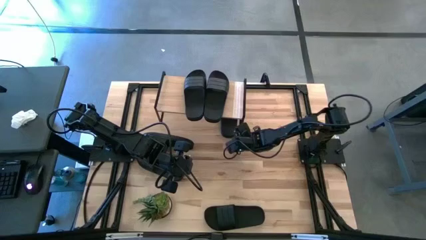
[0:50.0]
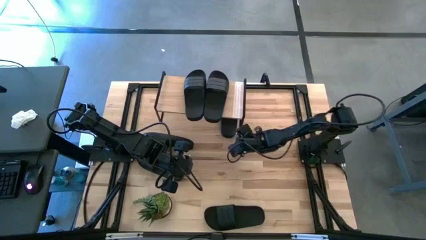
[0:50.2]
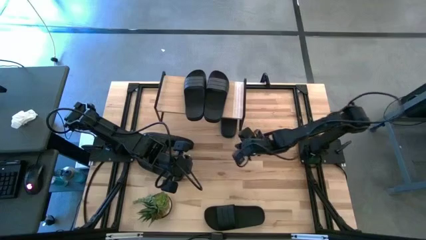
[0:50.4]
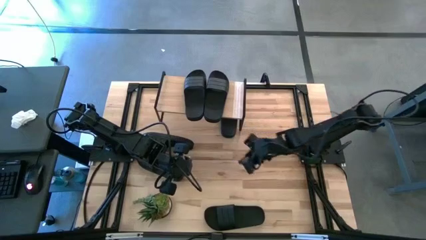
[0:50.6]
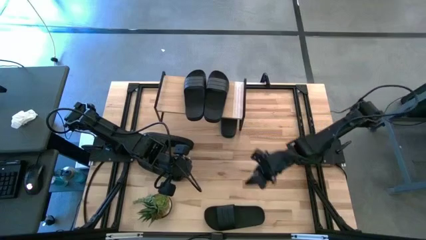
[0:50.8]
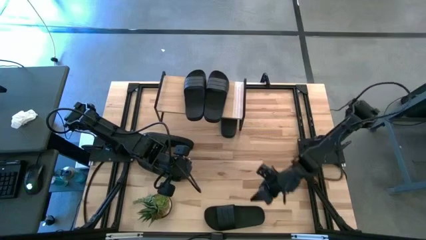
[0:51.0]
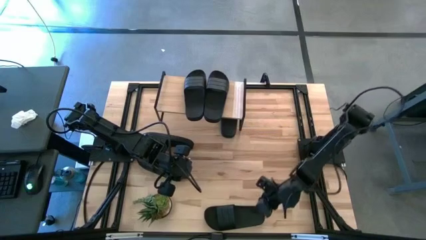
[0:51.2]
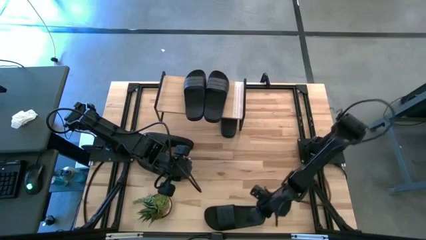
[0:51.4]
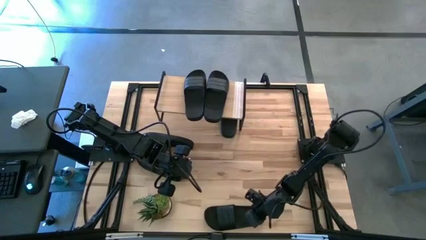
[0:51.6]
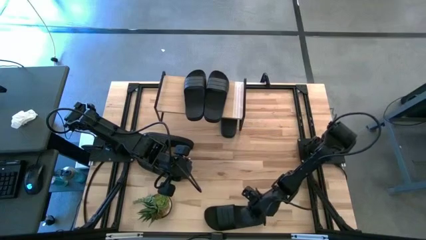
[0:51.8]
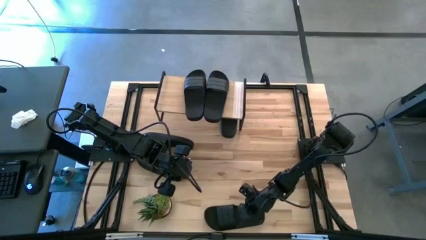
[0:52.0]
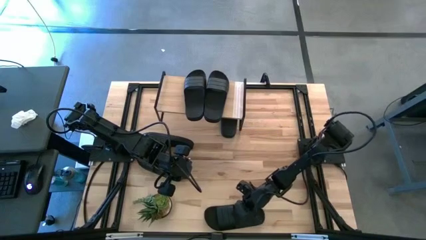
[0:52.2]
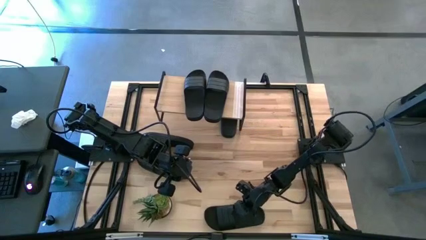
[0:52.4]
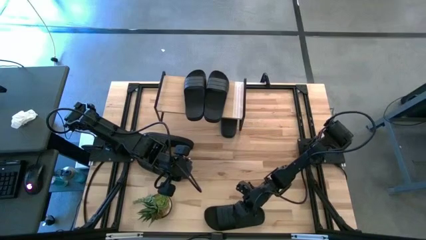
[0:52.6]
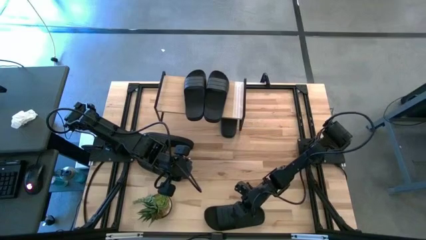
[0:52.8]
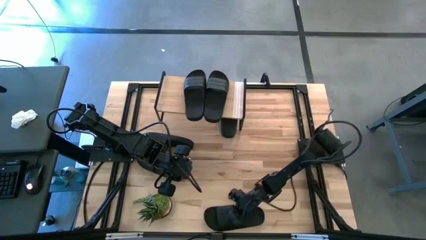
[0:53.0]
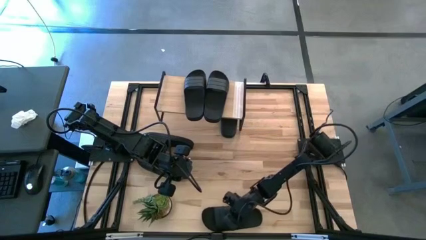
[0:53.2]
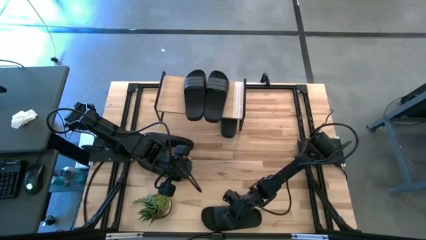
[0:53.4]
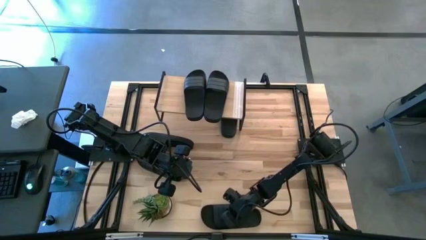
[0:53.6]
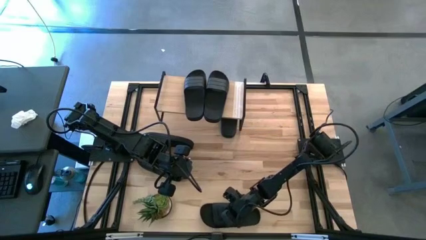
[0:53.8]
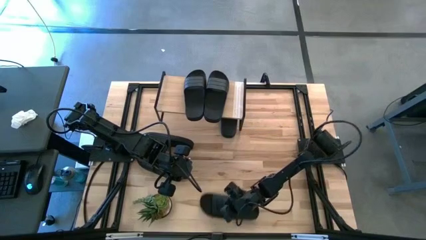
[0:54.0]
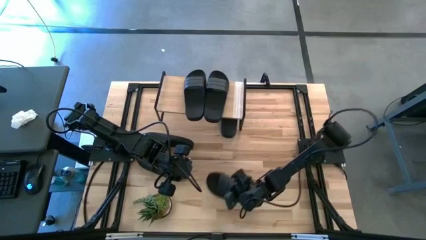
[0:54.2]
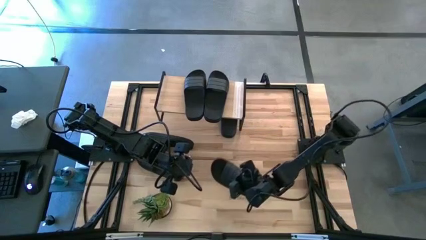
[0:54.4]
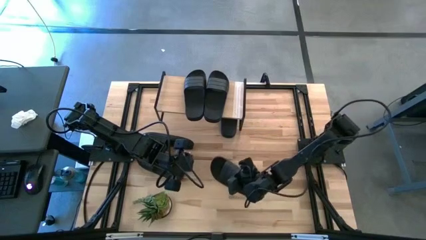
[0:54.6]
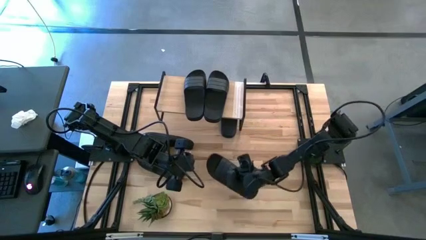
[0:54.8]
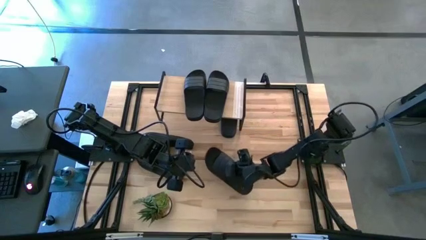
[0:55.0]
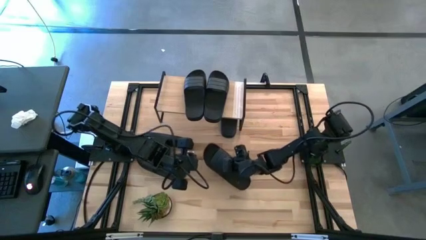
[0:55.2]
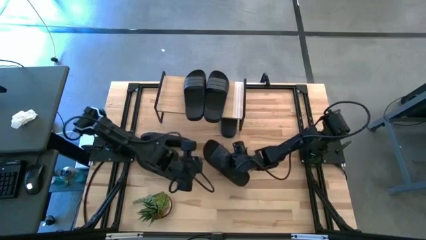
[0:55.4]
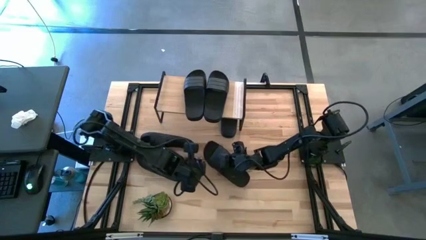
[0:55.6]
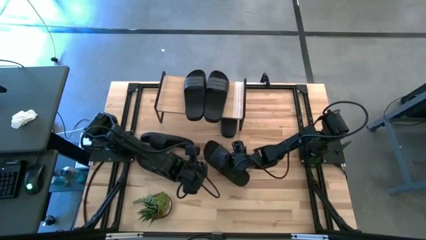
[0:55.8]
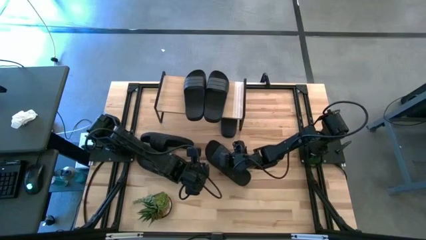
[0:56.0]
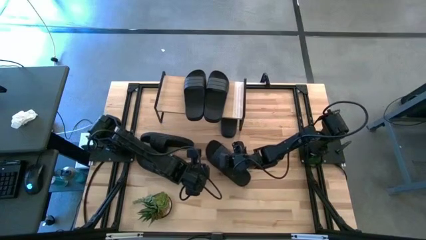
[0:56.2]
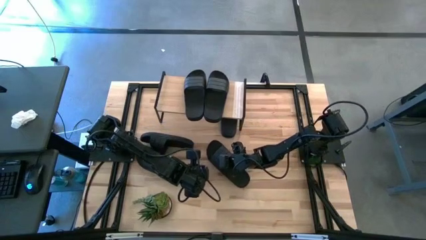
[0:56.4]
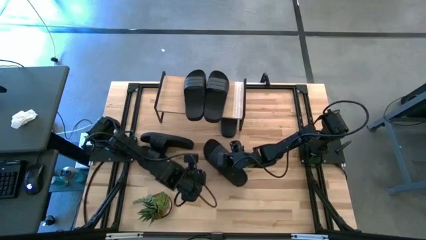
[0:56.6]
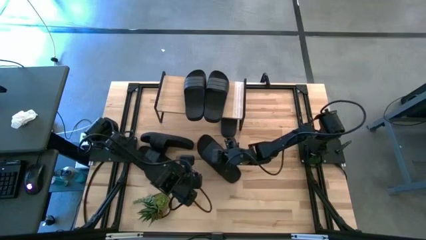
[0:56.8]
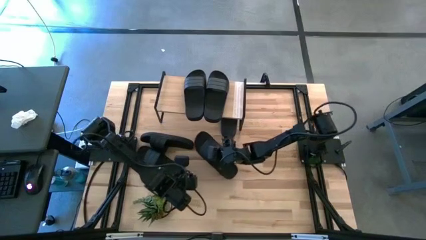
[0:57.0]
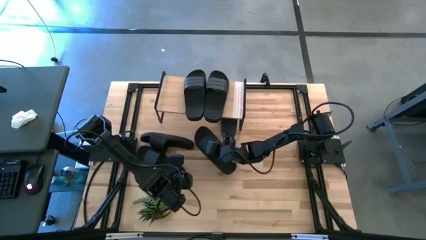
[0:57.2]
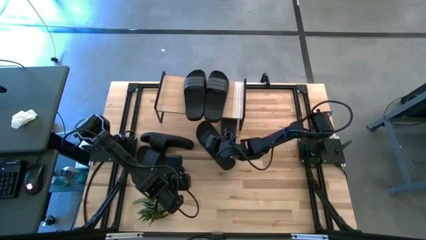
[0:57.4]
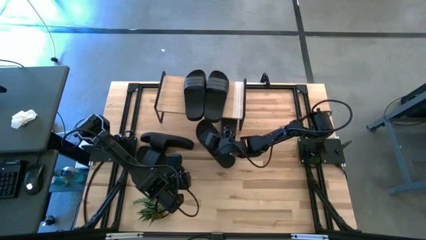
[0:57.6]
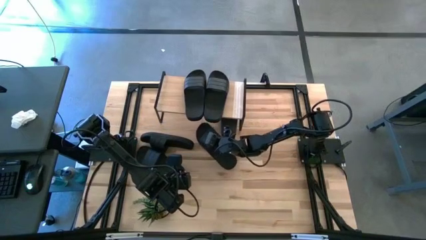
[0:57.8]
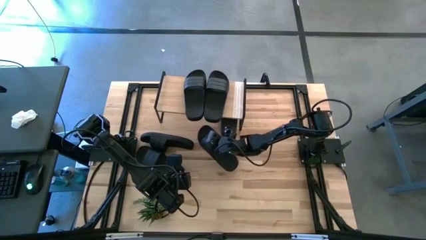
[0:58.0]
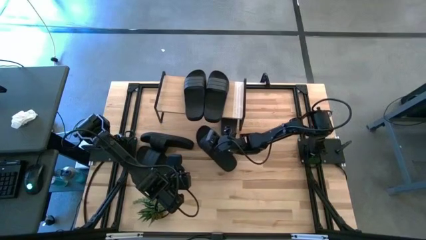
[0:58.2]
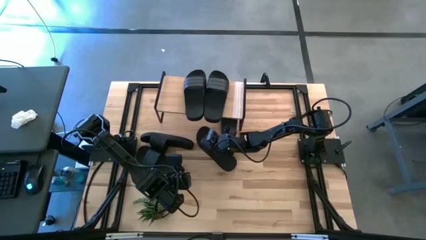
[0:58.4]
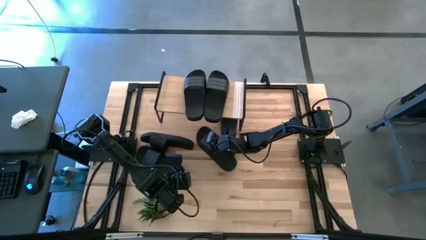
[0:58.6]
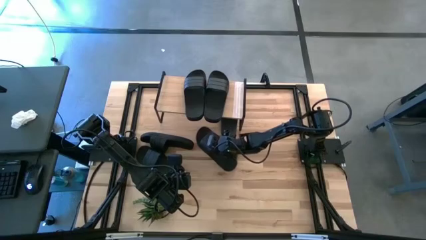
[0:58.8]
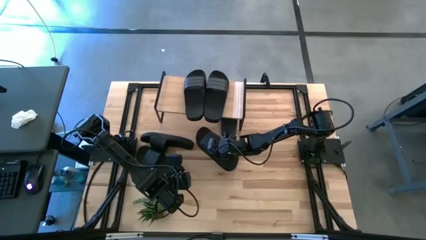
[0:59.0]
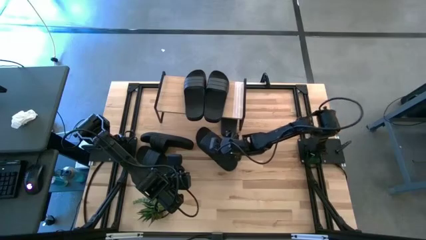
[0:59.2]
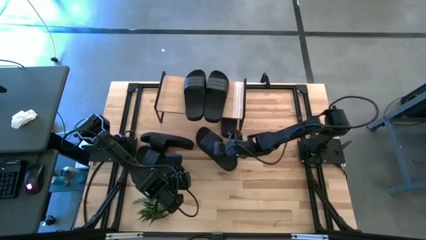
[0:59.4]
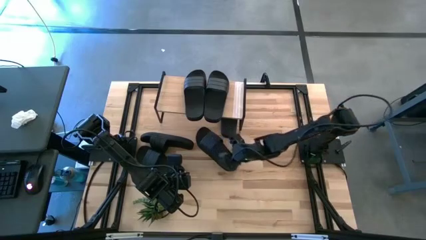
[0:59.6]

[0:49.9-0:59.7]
Task: Pick and place slides into the shelf
Put the black slide under the shelf

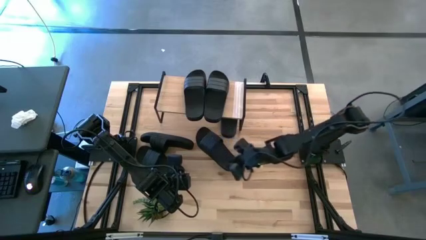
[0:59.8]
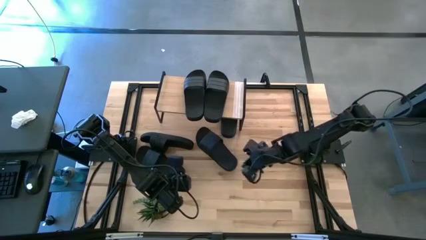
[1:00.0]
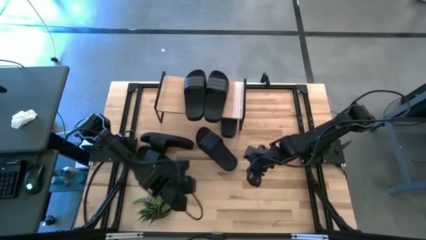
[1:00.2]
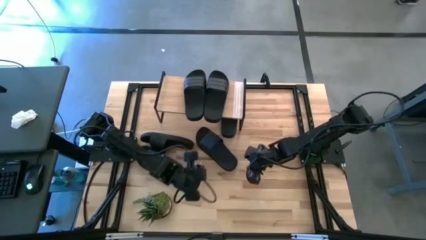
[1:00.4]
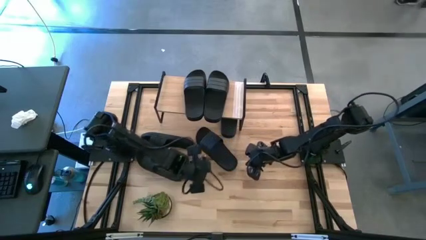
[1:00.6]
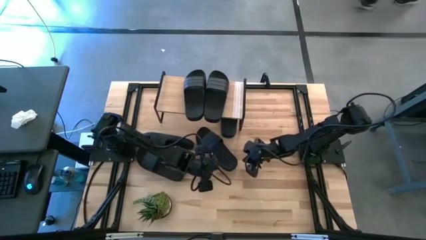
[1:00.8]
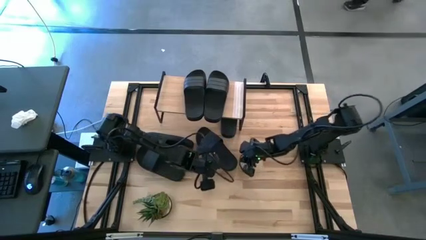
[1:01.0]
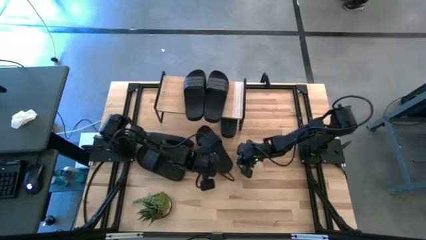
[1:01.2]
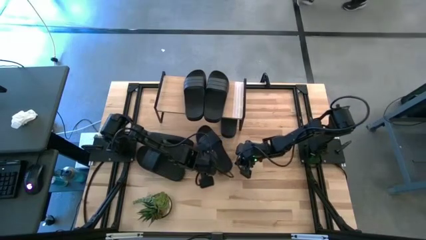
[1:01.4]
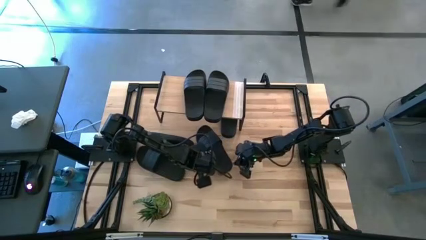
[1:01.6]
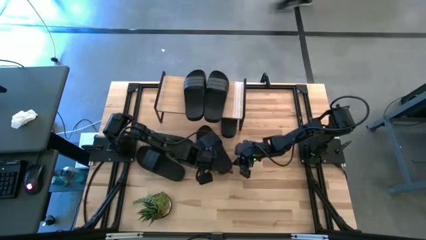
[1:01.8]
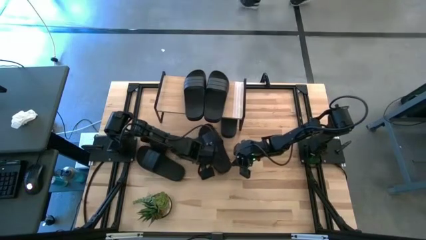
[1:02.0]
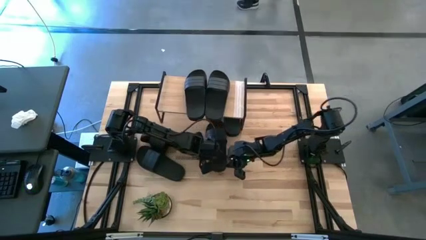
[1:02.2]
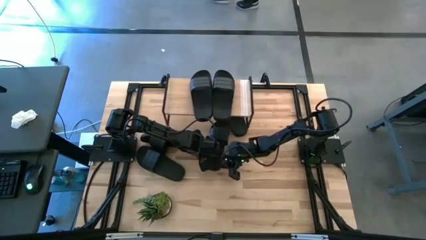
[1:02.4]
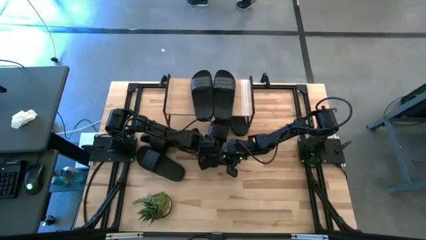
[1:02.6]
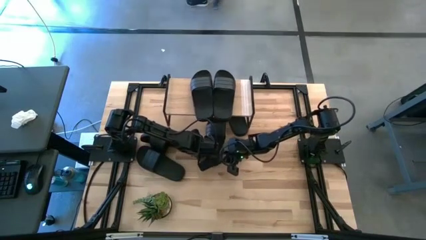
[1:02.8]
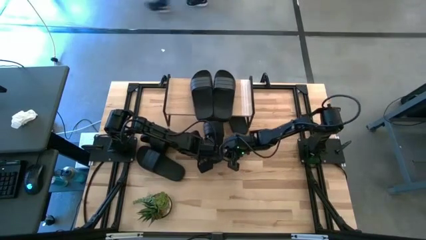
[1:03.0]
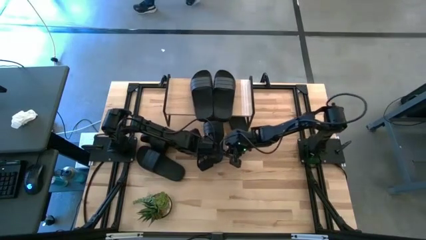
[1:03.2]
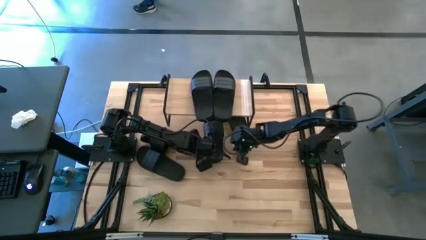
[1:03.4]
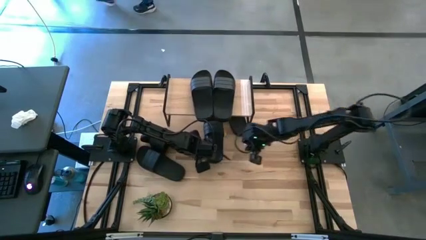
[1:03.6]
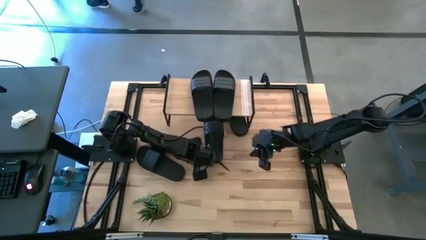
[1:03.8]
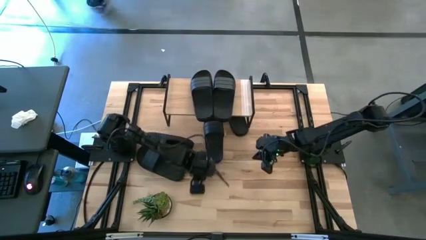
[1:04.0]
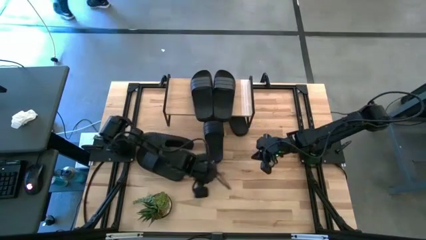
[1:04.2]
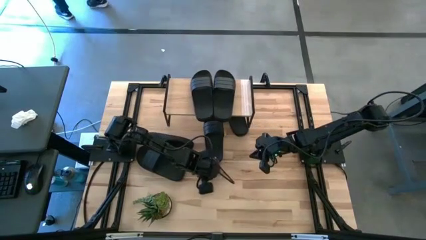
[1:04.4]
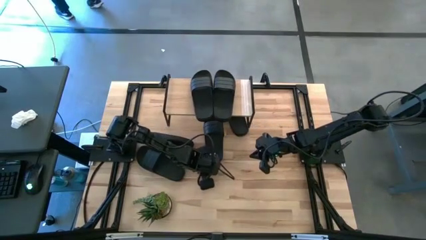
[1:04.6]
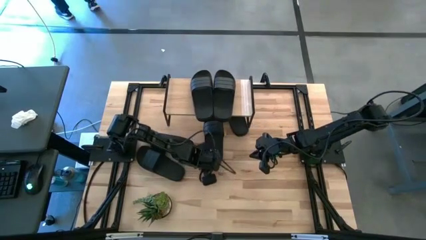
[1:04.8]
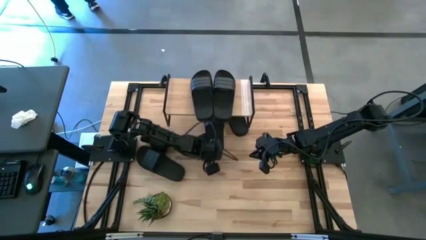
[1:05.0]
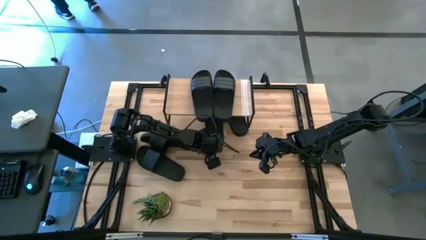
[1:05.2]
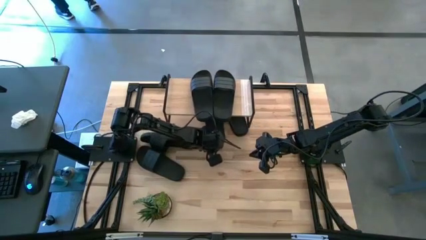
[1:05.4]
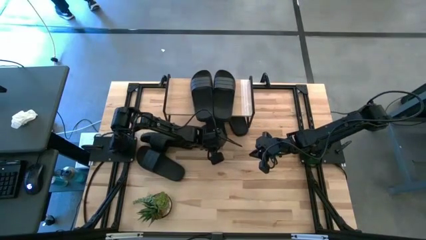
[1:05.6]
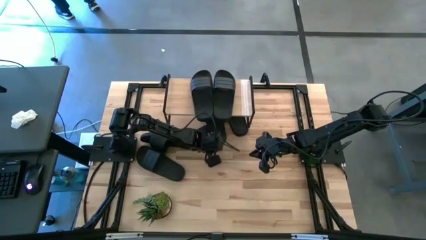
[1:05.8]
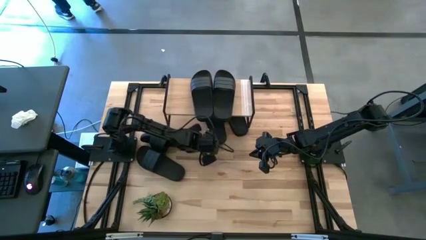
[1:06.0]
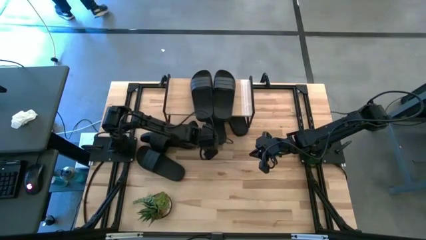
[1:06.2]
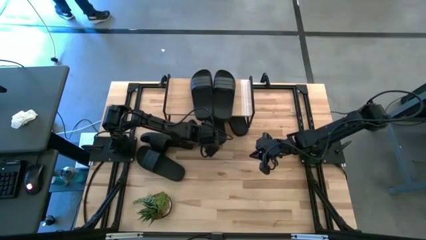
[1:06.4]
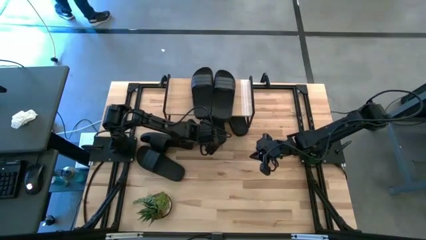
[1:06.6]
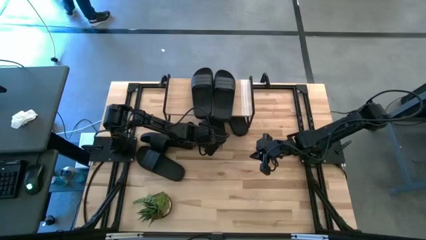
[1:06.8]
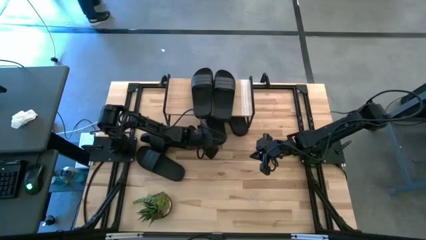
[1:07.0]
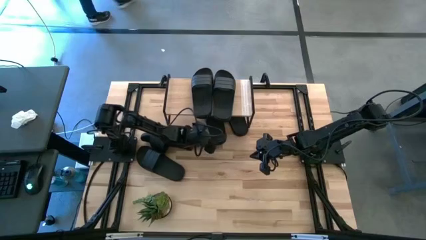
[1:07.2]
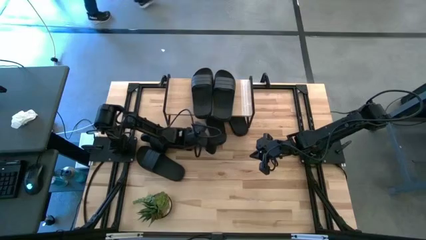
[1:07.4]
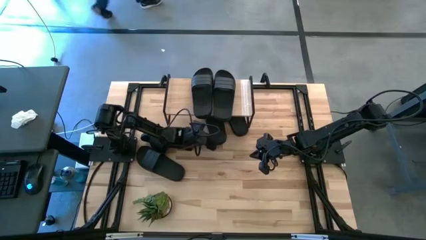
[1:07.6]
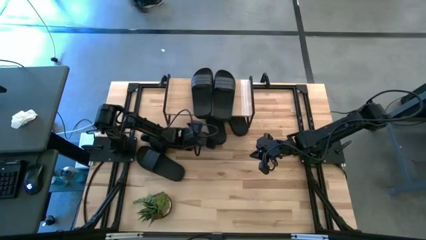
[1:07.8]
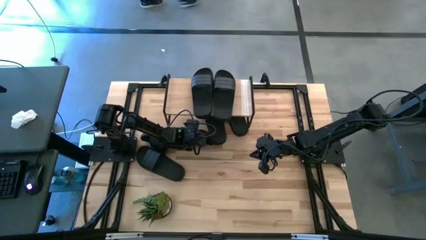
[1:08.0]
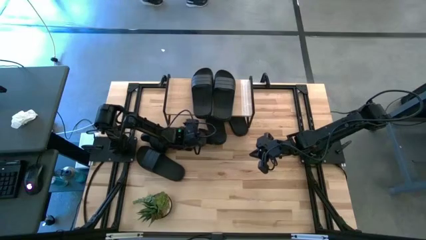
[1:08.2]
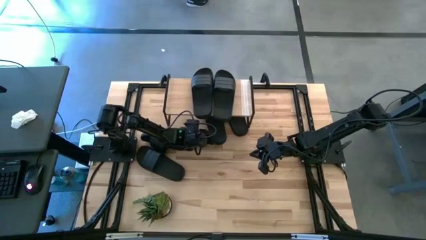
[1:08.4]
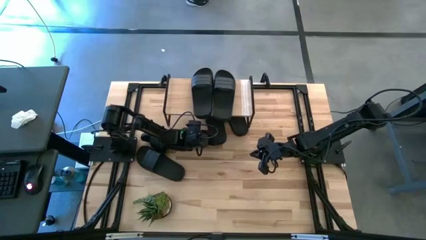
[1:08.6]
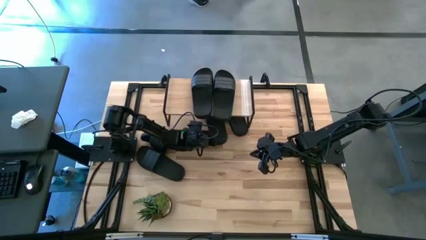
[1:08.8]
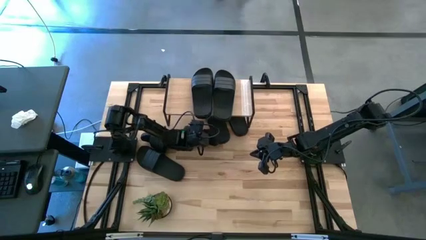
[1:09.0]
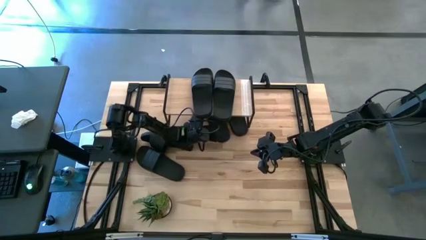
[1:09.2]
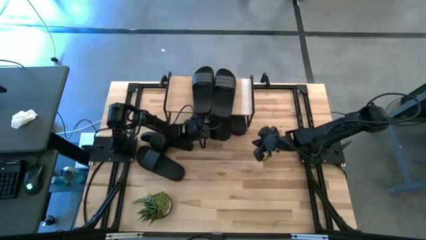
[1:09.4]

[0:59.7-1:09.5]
Put the black slide under the shelf
